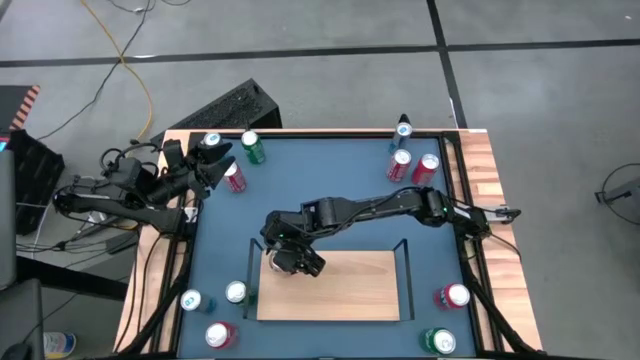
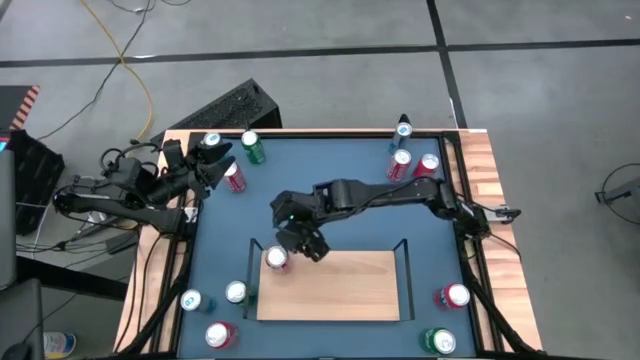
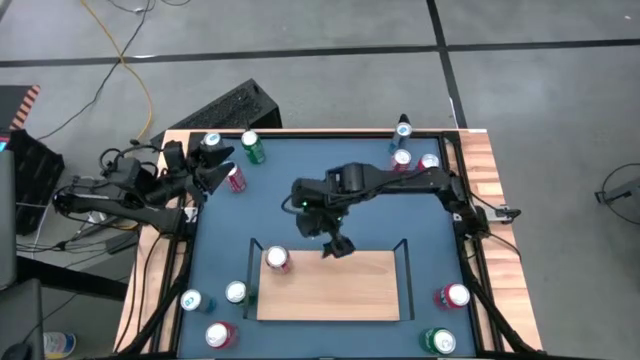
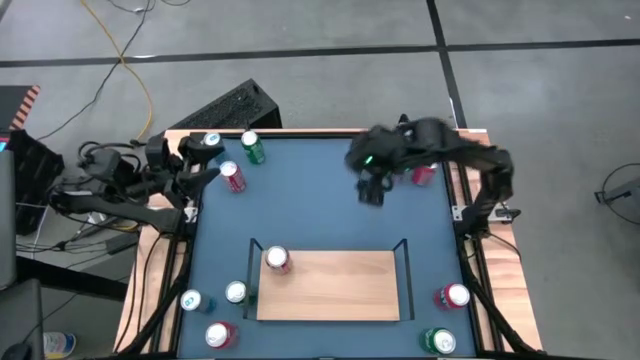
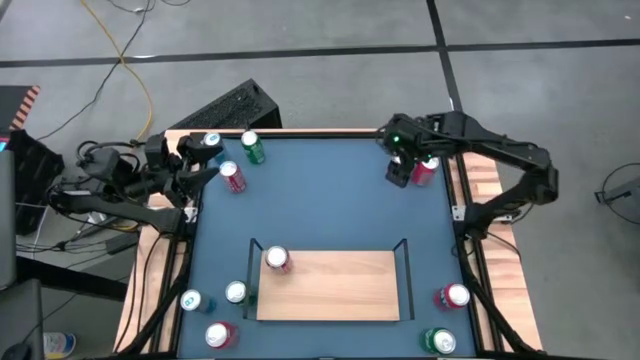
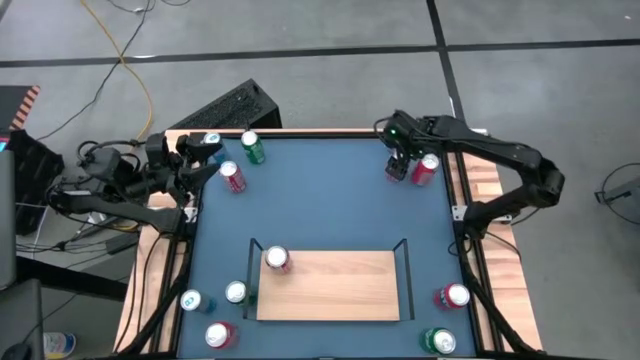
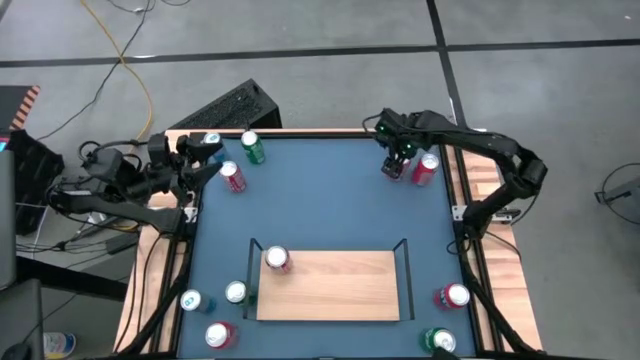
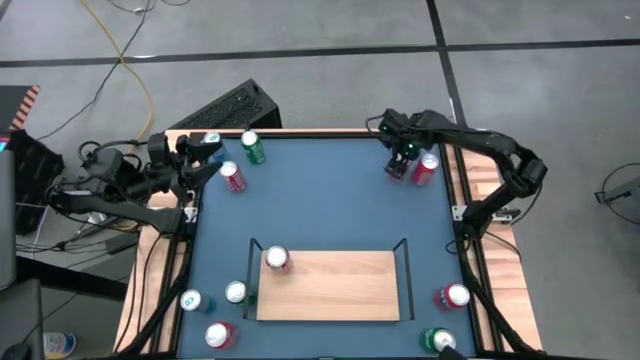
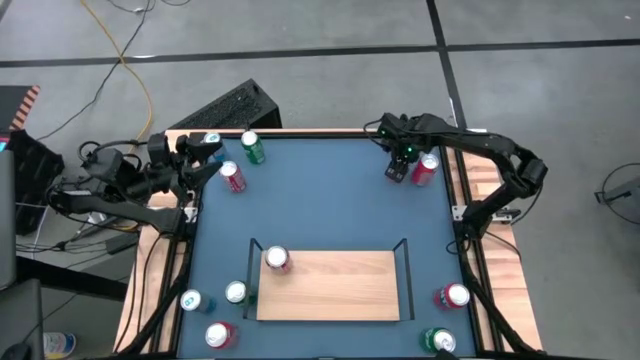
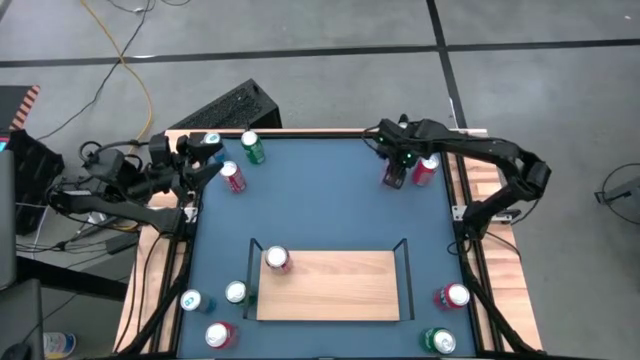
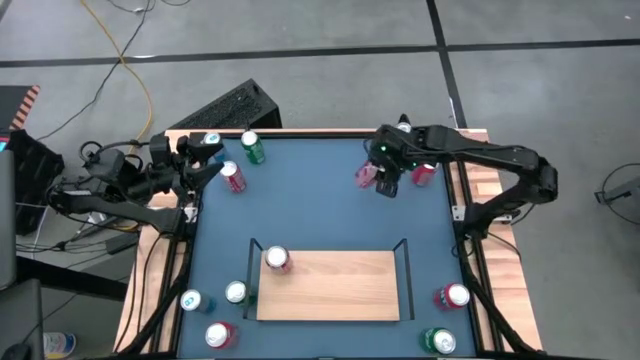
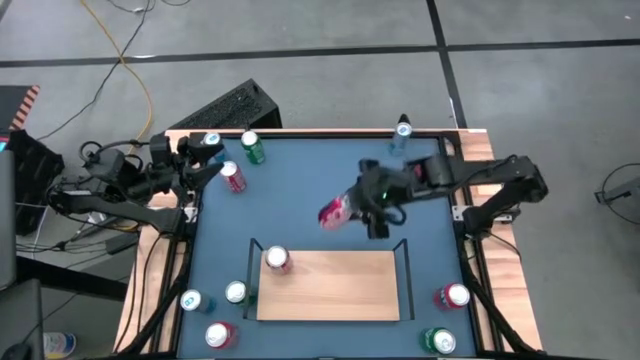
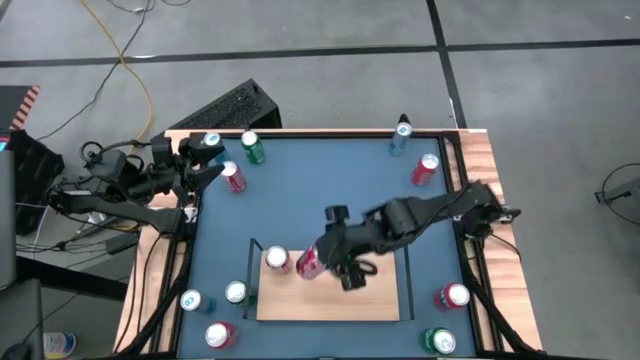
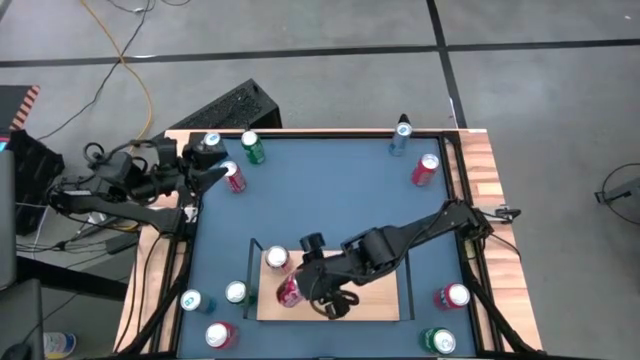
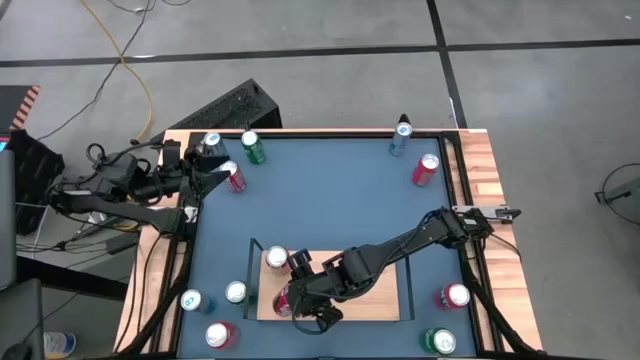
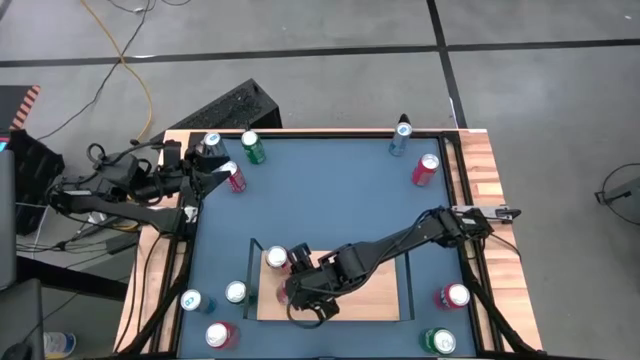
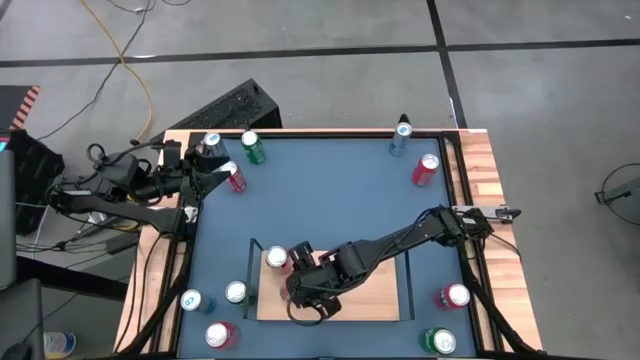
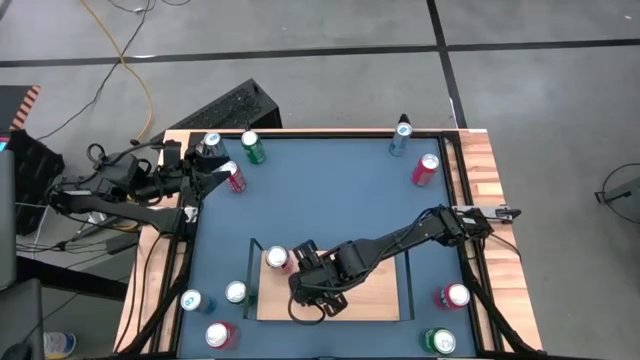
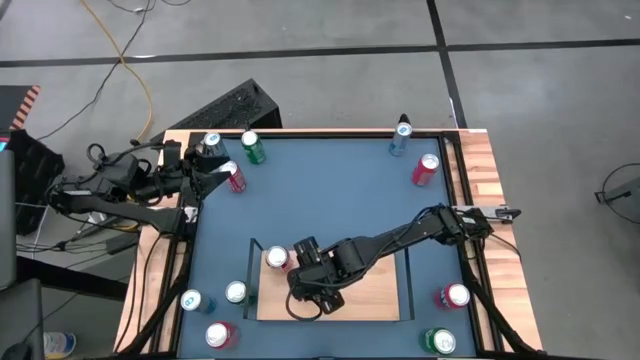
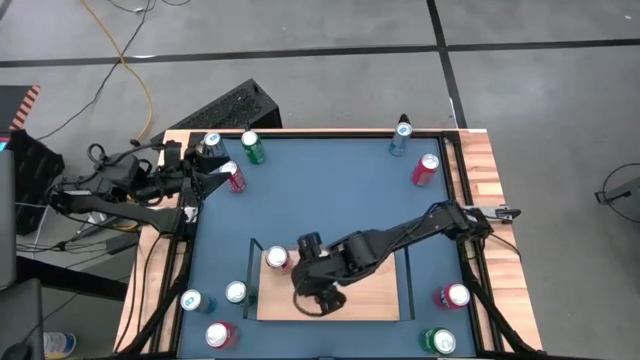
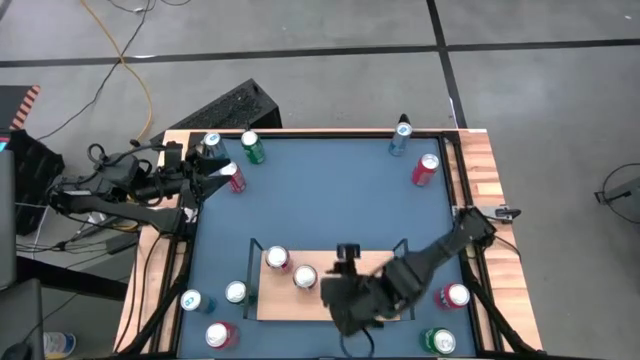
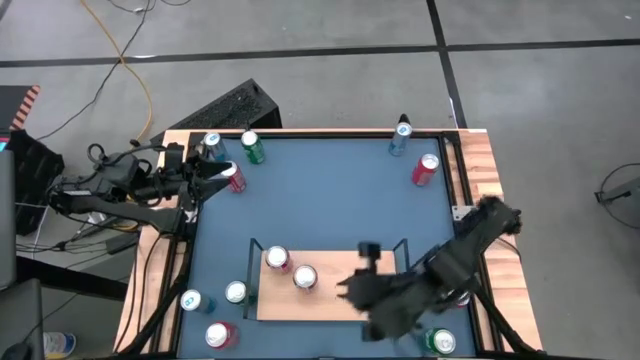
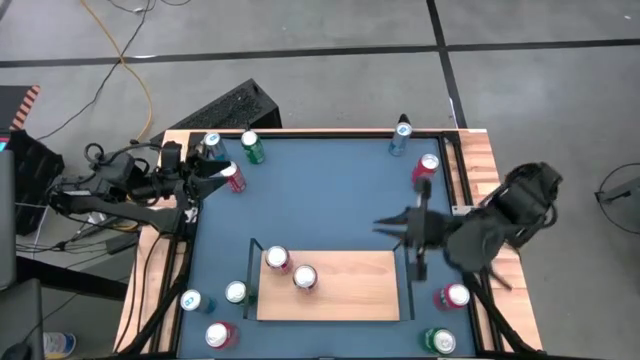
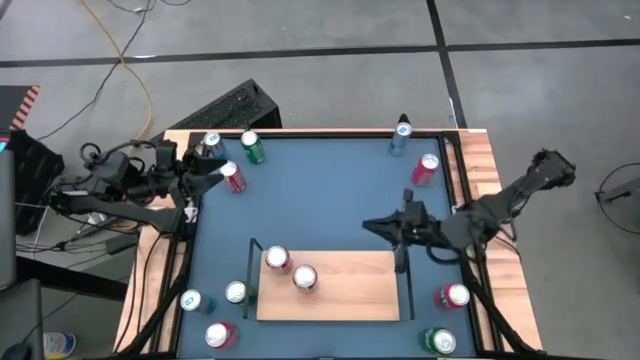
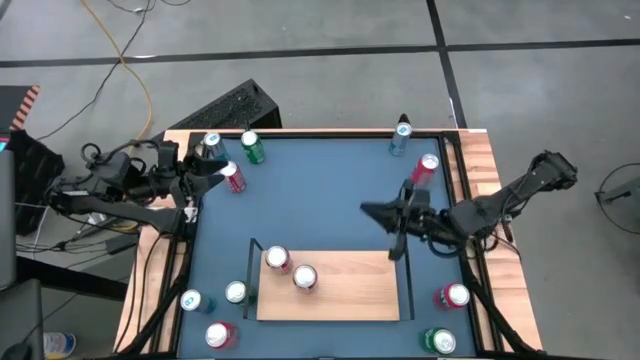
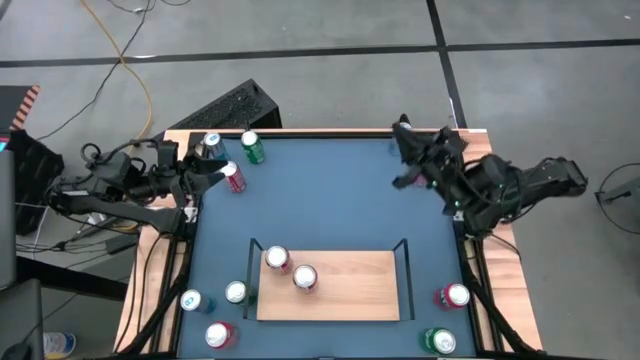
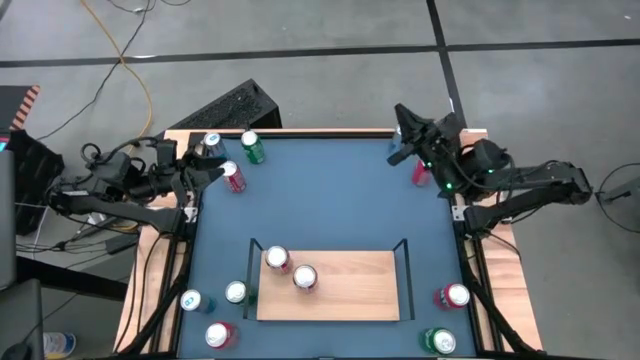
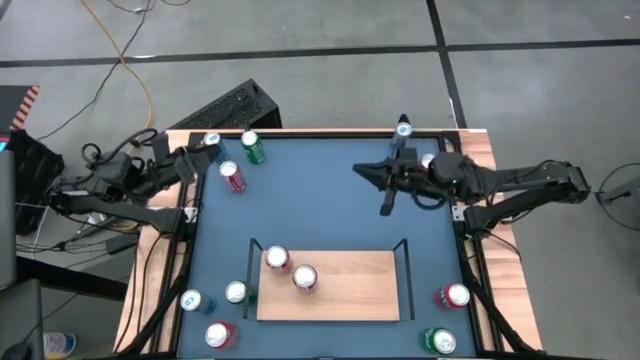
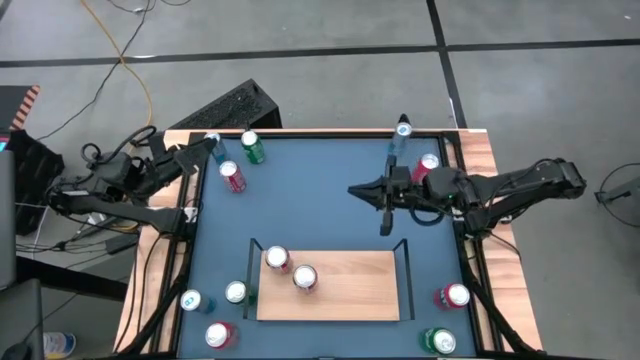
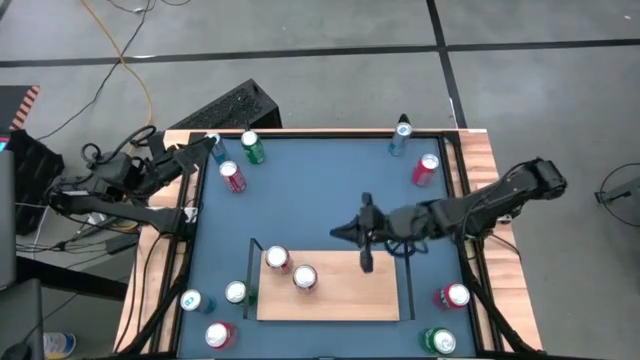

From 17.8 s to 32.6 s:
Task: Place canned beverage on shelf
Put the right red soda can on the shelf aligned with the other red soda can

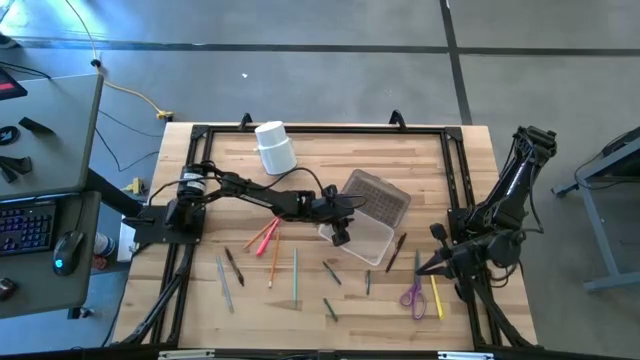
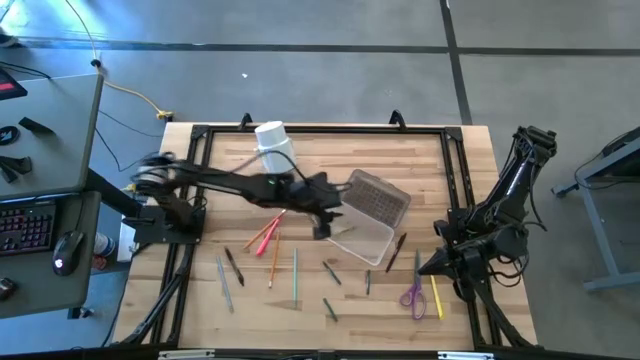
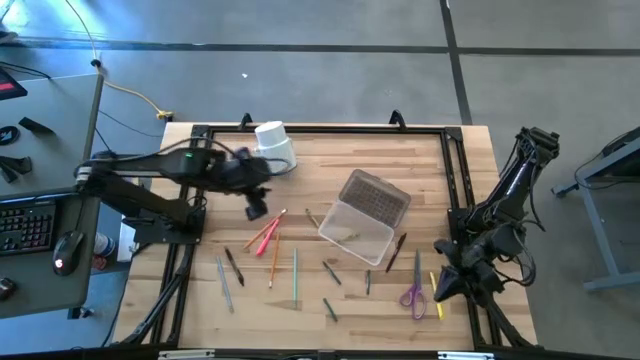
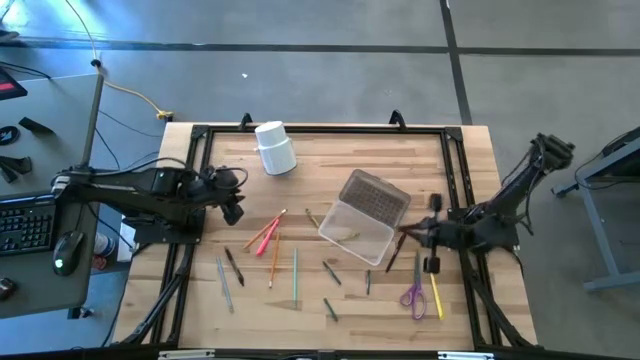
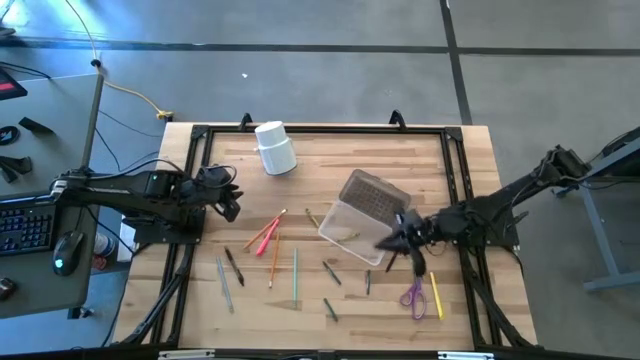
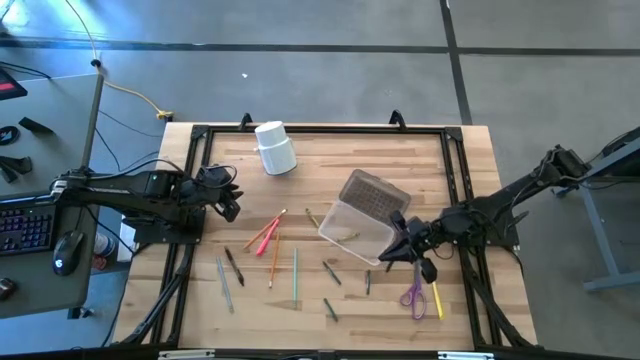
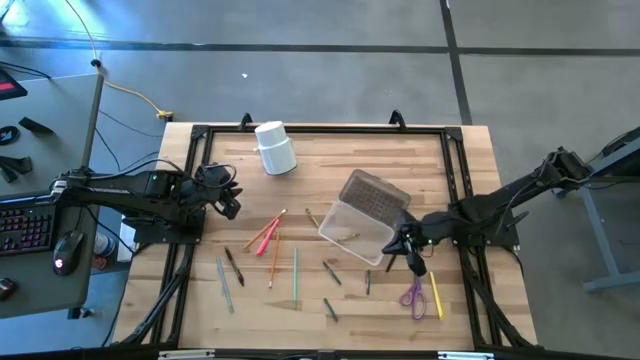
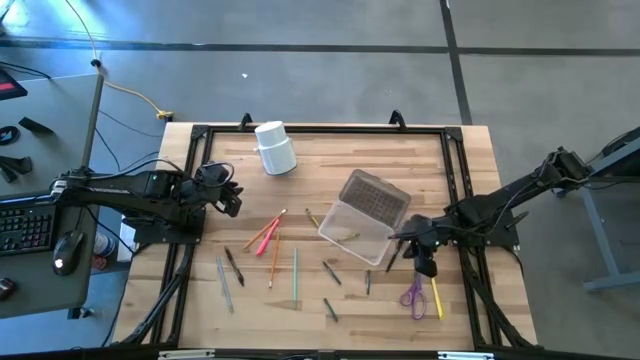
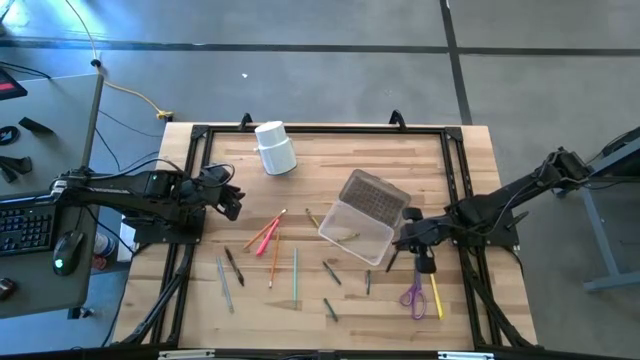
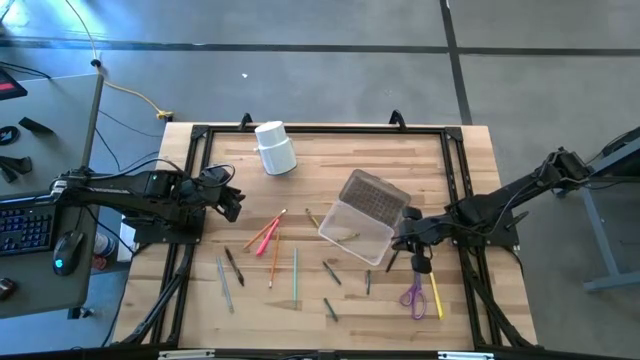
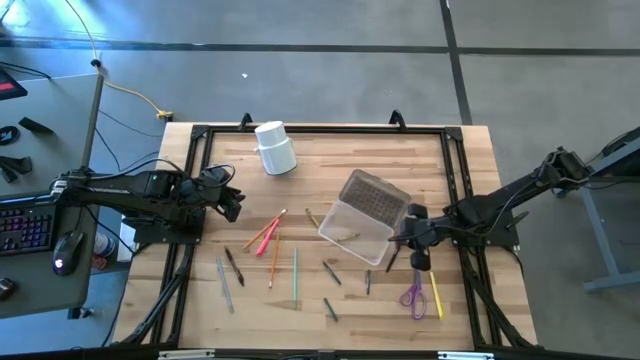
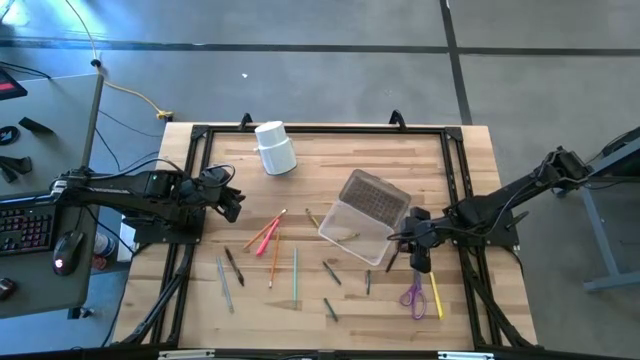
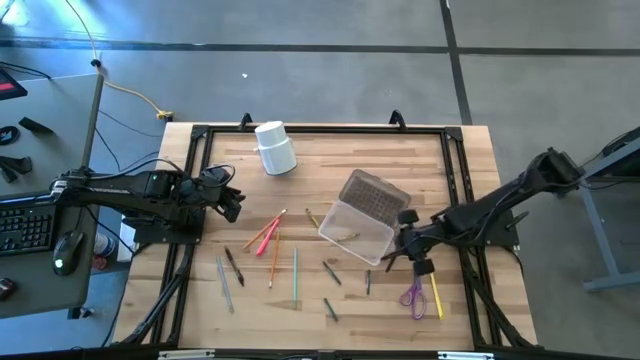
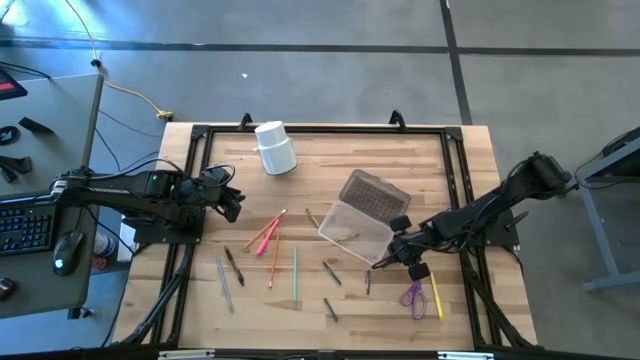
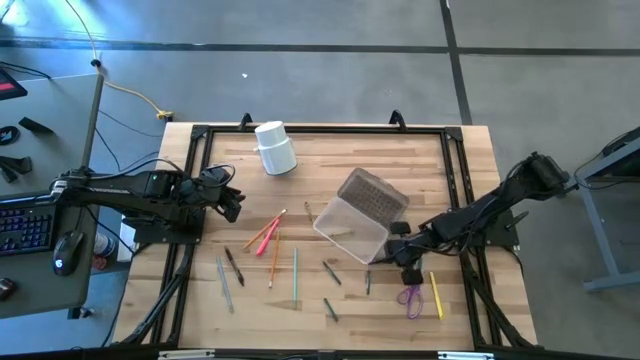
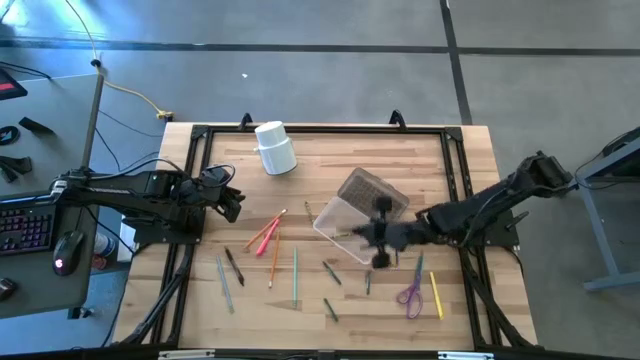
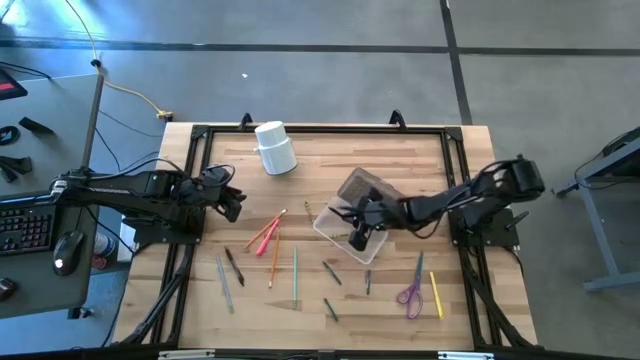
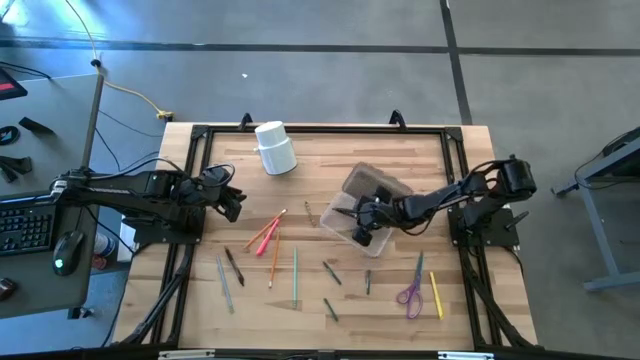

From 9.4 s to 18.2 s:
Task: Pick & place school supplies into a supply box
Put the right black pen into the supply box
